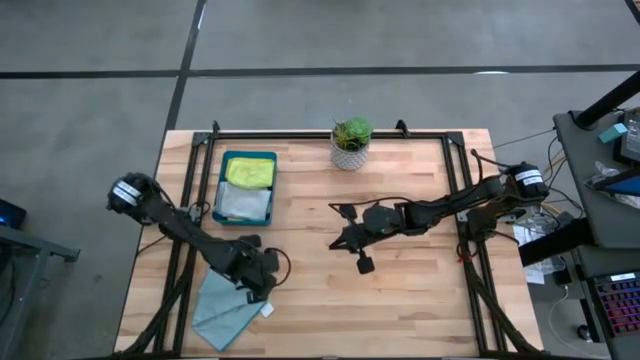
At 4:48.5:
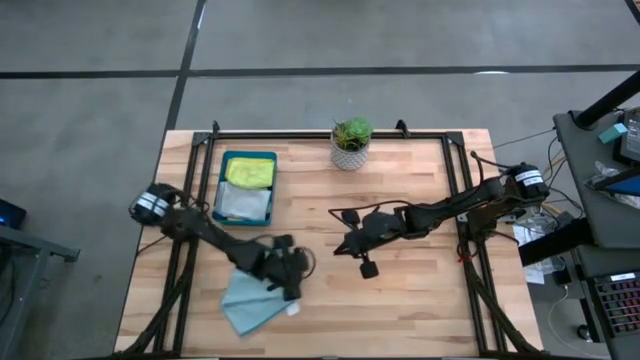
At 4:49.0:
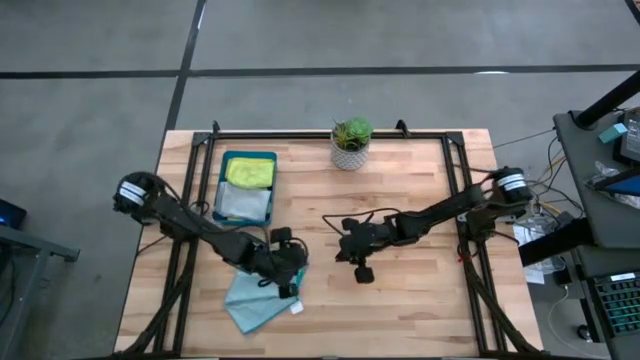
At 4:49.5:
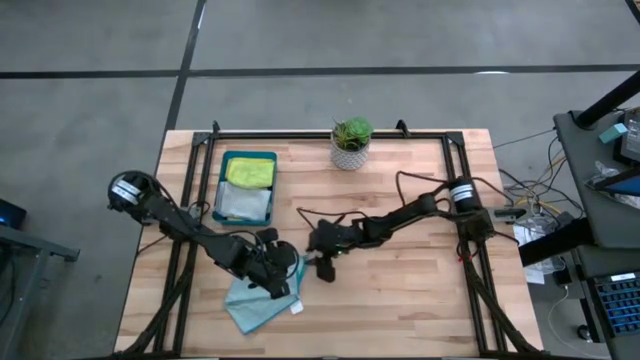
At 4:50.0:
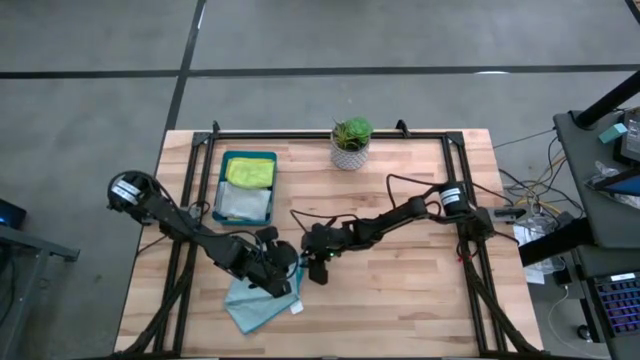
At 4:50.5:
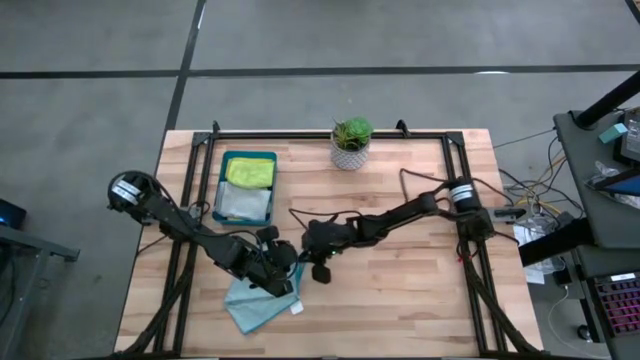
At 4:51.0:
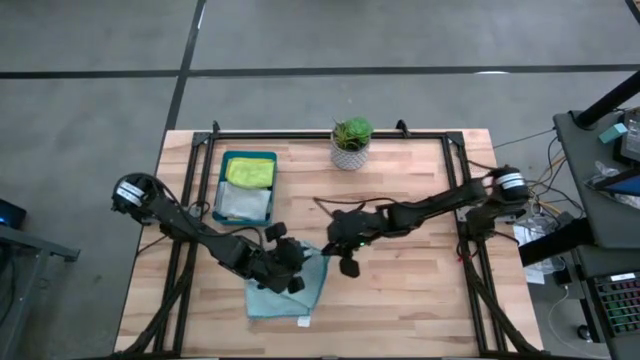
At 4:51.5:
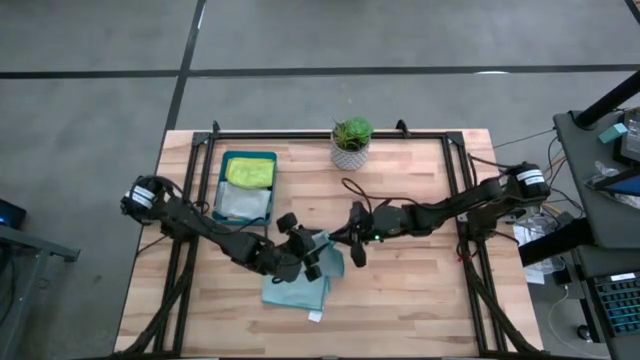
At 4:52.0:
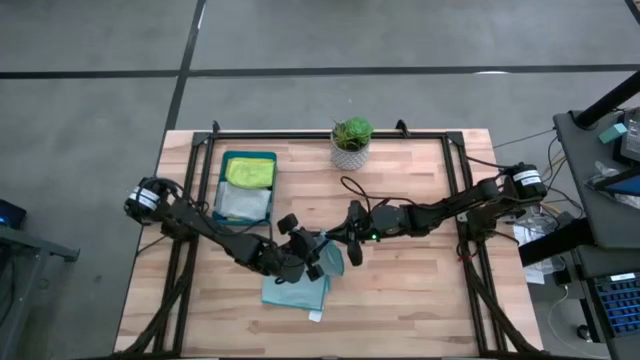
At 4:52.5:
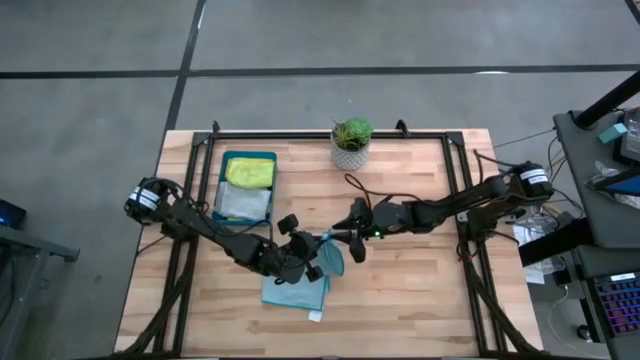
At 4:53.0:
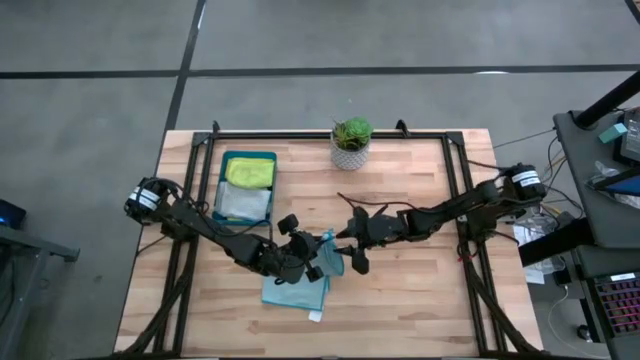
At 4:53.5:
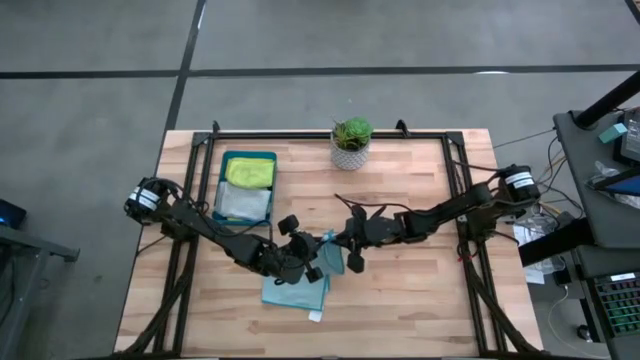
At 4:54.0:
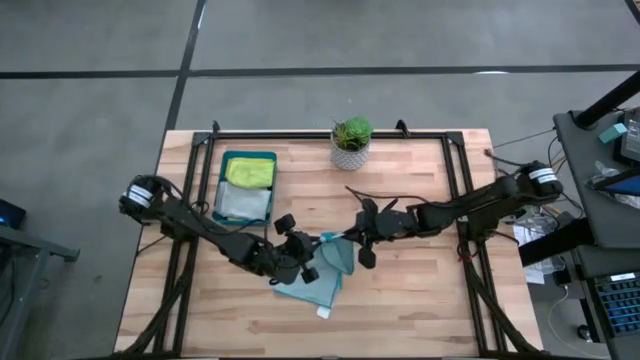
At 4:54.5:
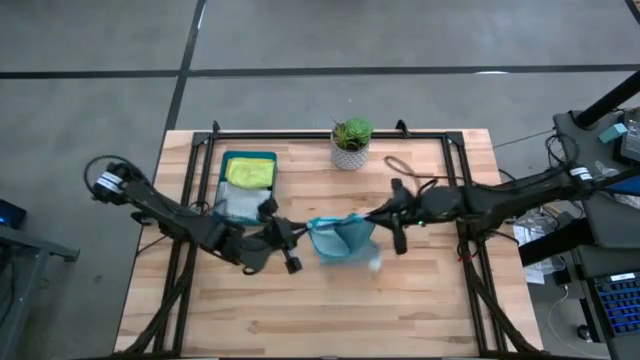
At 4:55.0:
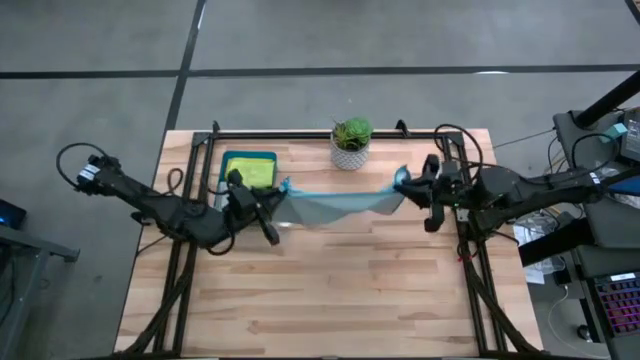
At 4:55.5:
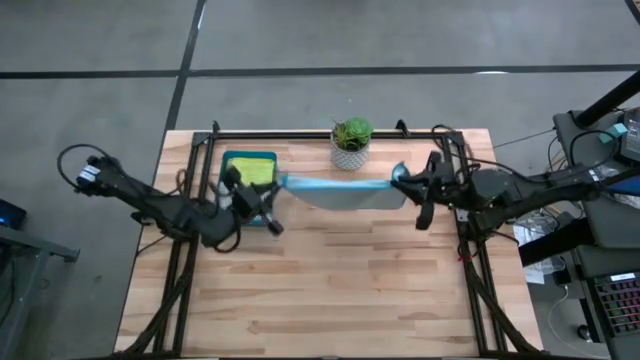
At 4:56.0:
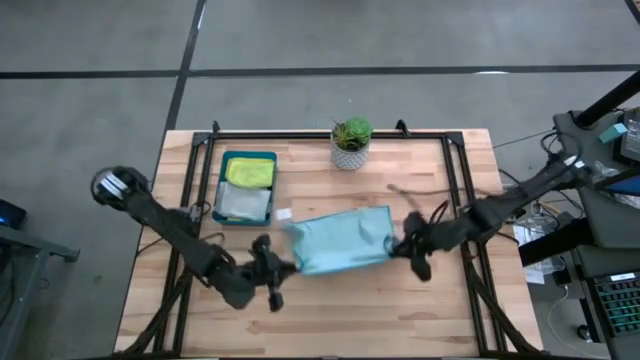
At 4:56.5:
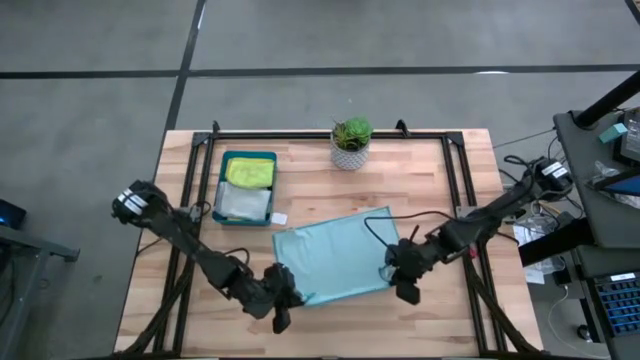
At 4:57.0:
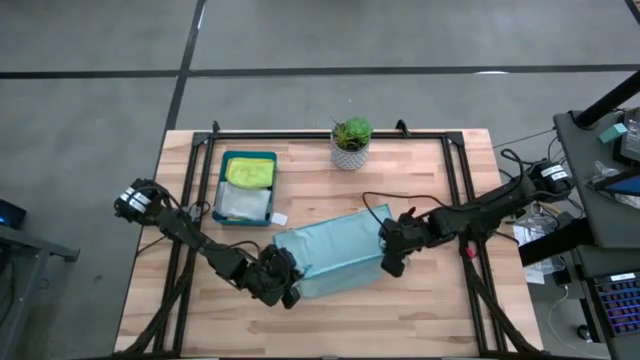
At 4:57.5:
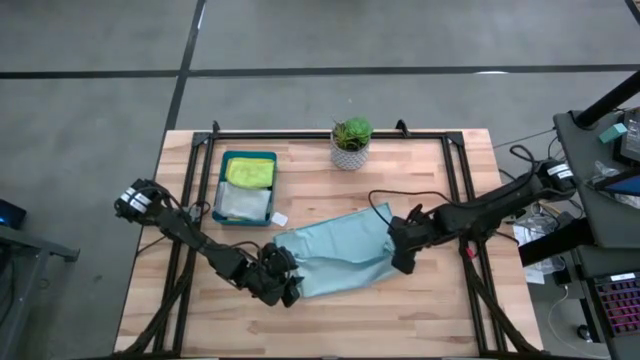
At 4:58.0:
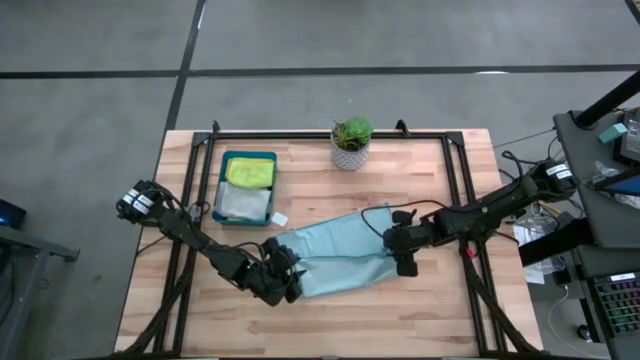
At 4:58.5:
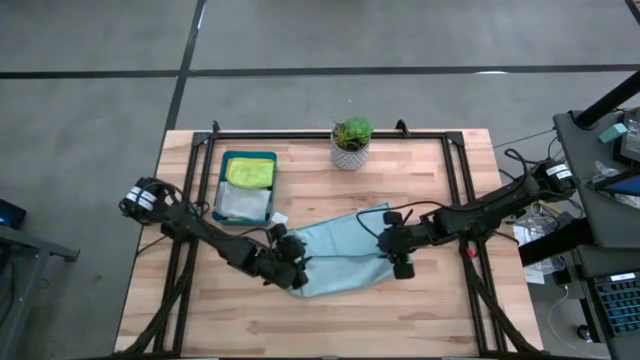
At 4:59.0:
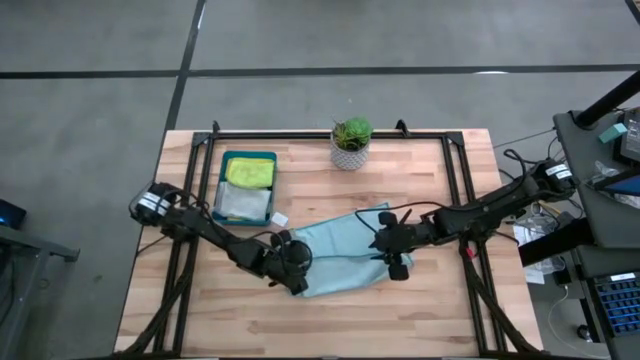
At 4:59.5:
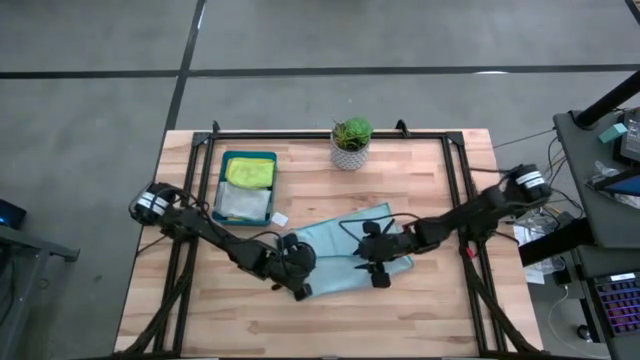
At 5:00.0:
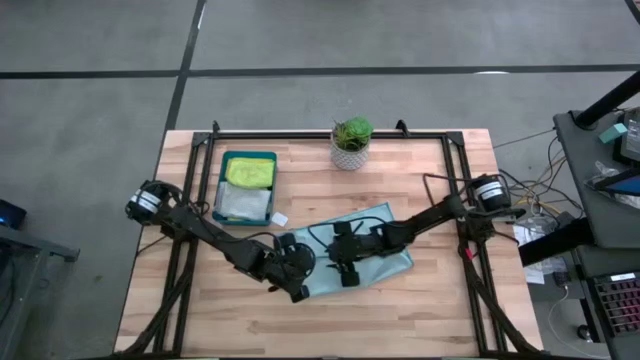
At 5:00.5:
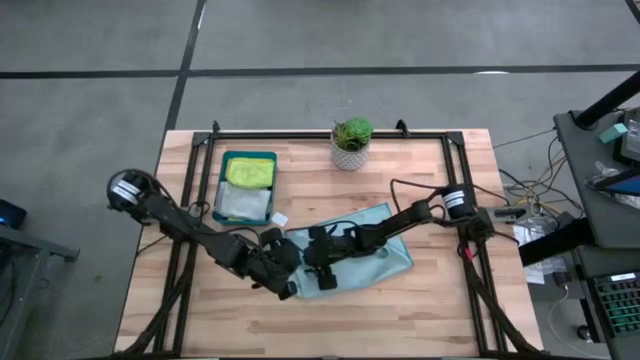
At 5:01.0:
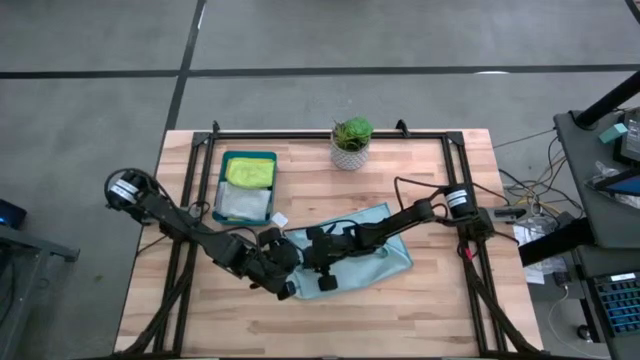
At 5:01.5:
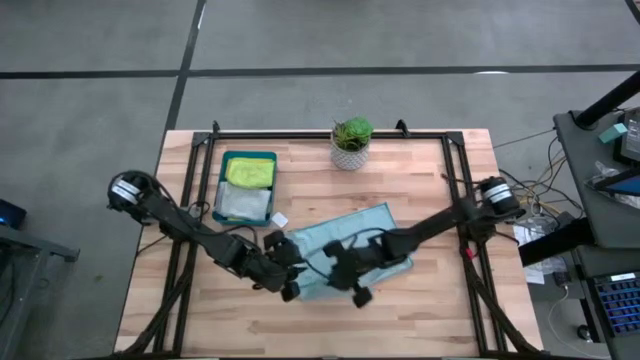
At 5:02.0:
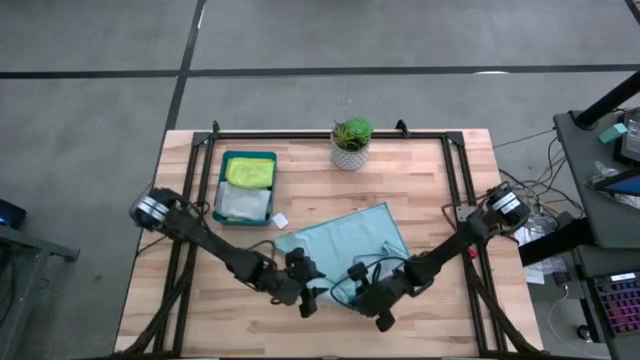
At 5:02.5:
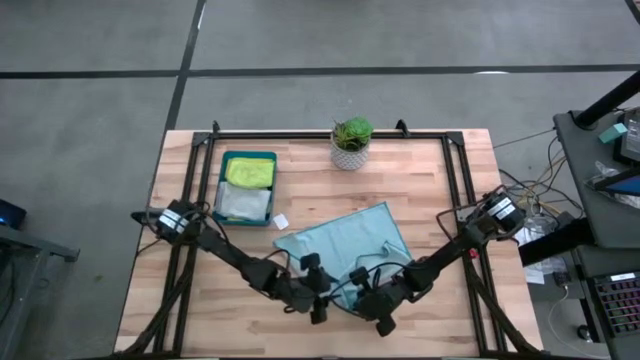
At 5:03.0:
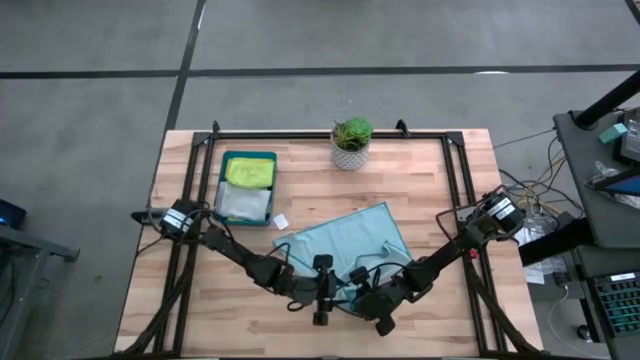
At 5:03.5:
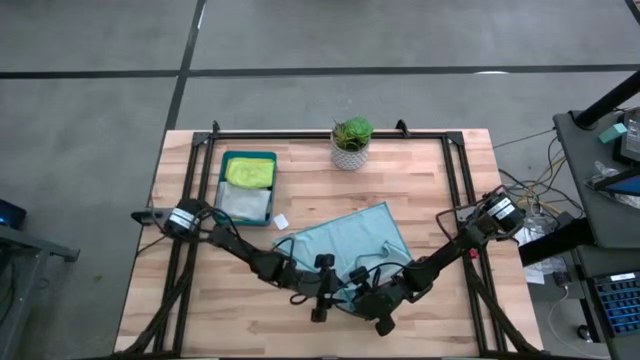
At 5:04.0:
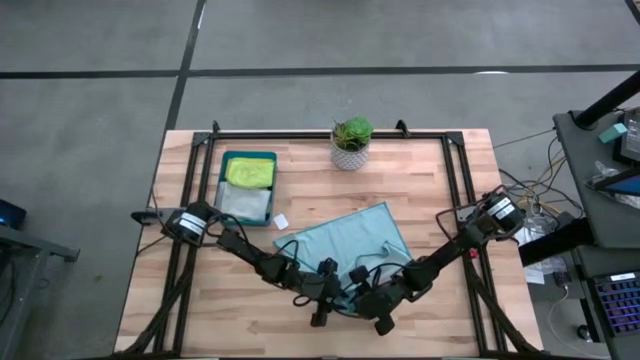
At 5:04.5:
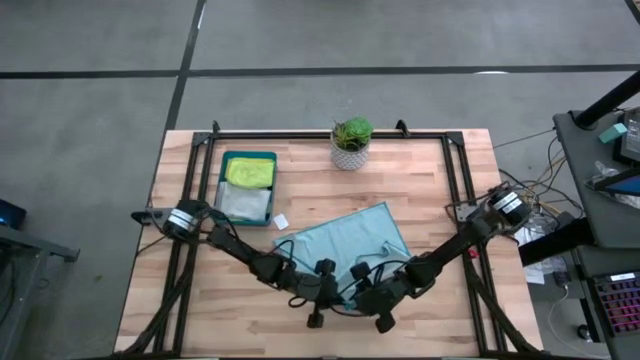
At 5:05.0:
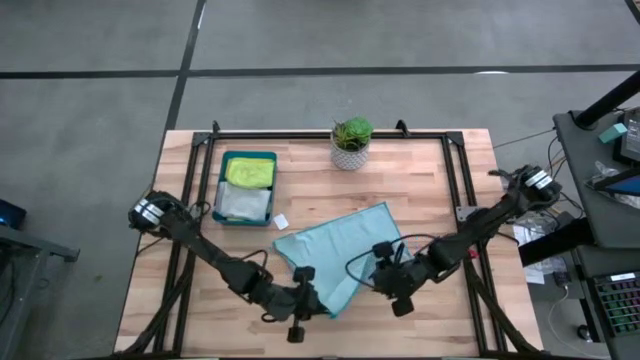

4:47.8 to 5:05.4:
Task: Fold microfiber towels
Fold the blue towel

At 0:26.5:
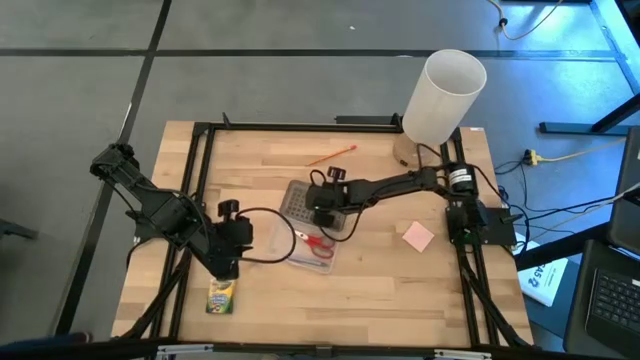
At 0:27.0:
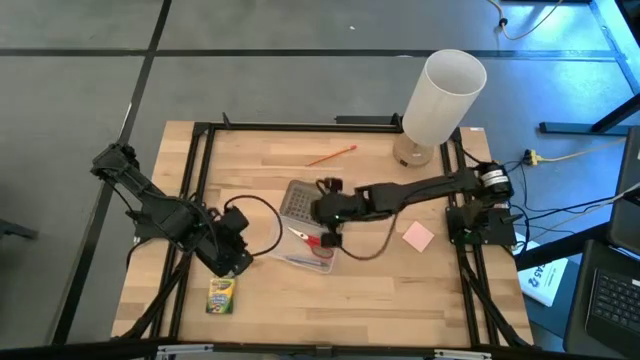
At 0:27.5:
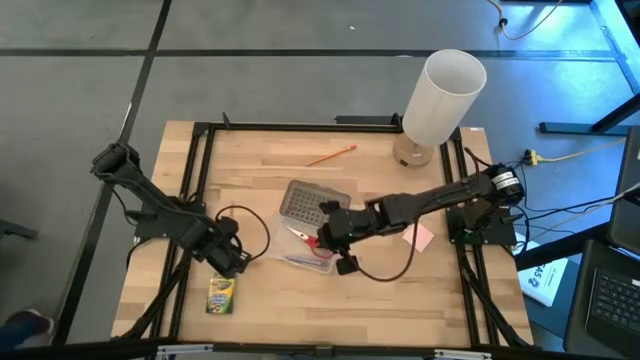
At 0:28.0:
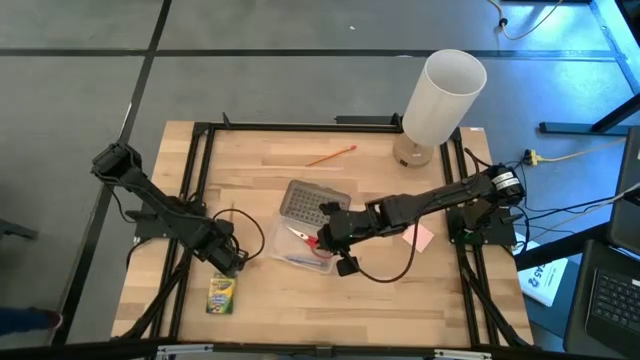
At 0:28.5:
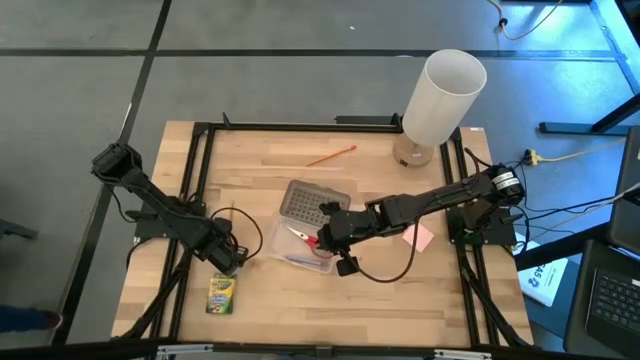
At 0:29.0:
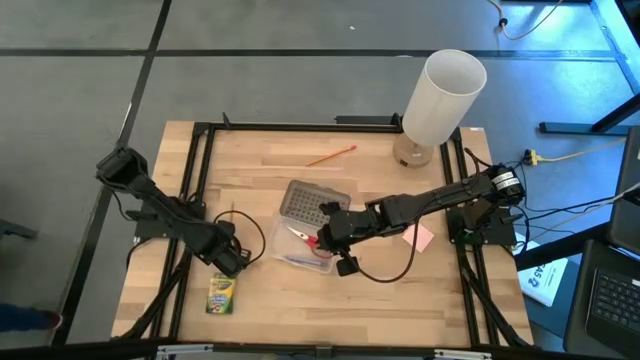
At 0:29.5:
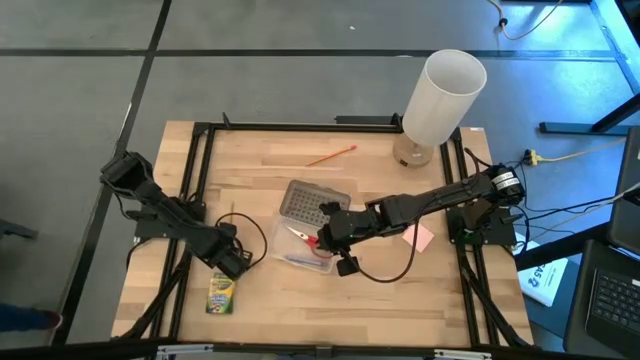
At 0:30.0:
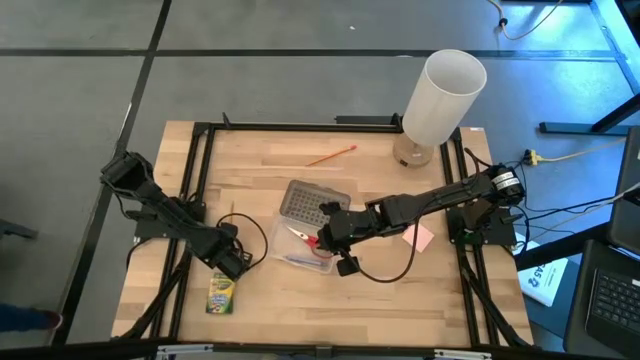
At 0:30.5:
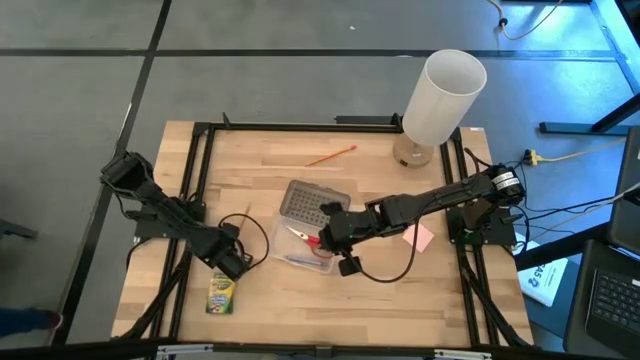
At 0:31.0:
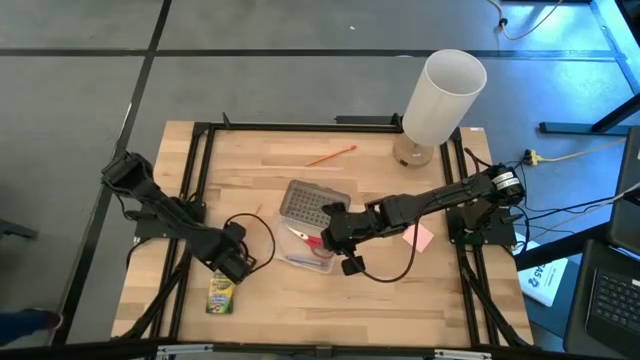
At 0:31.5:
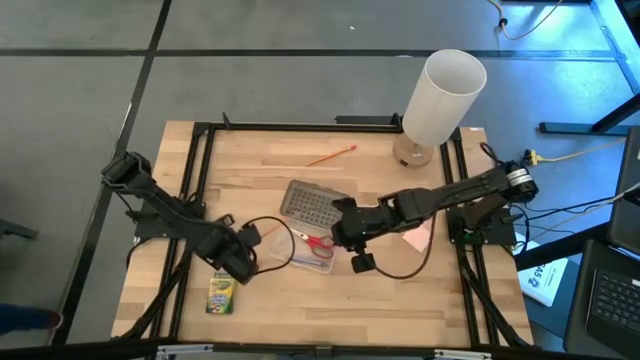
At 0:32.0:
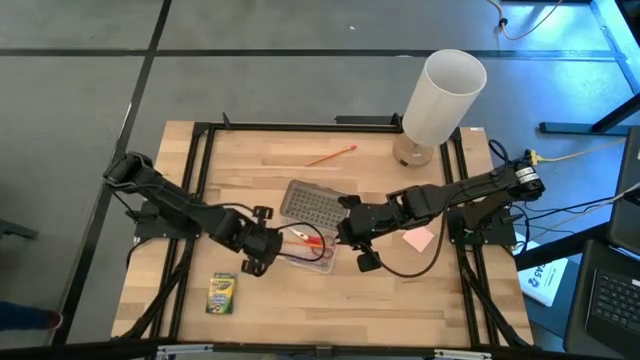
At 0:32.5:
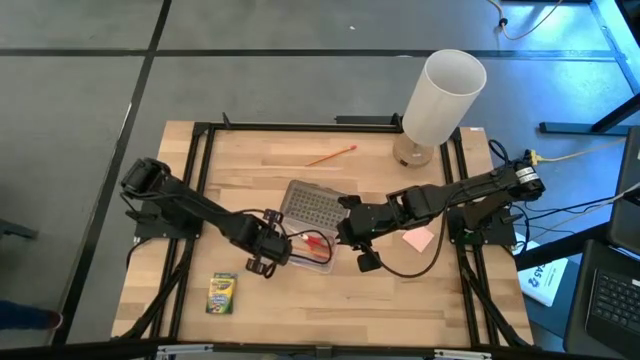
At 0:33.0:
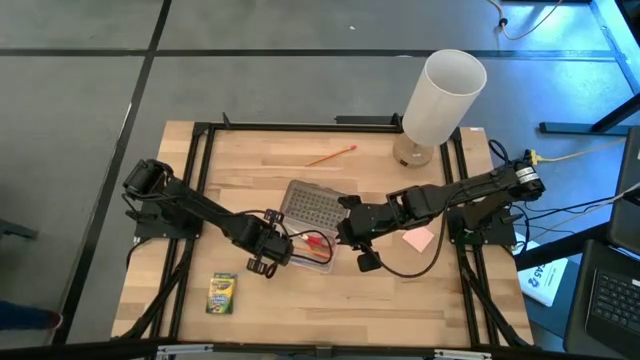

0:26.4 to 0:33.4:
Task: Pack school essentials
Put the bottom yellow pencil into the black supply box
